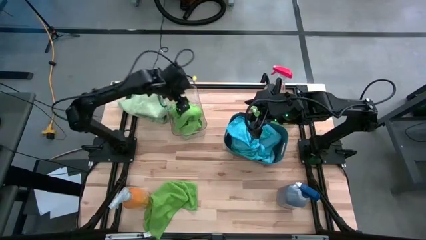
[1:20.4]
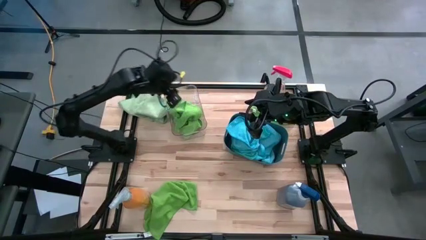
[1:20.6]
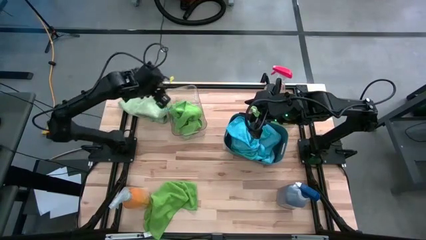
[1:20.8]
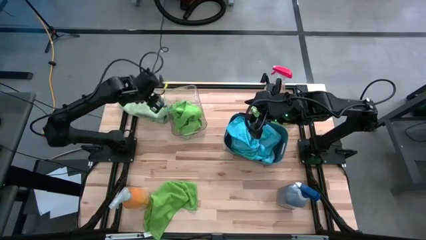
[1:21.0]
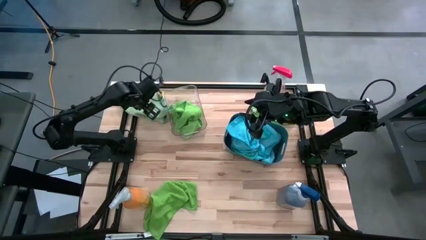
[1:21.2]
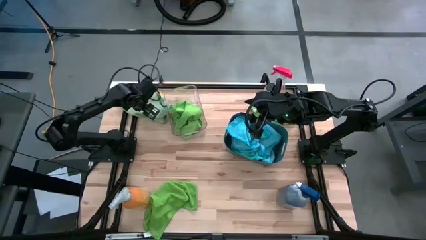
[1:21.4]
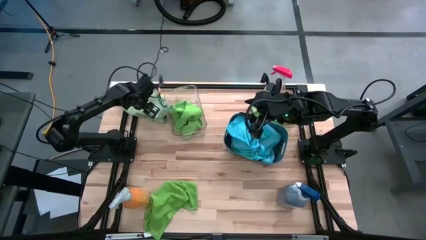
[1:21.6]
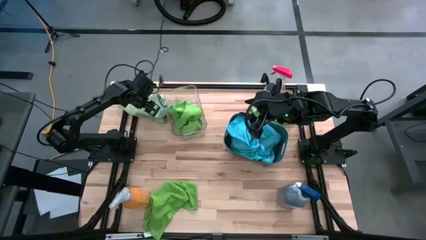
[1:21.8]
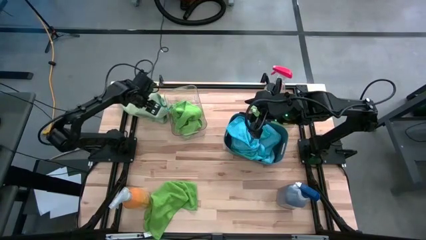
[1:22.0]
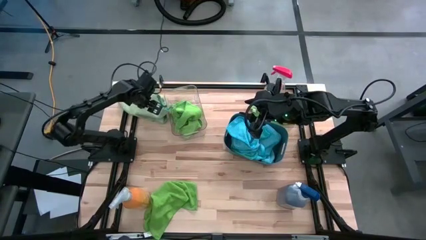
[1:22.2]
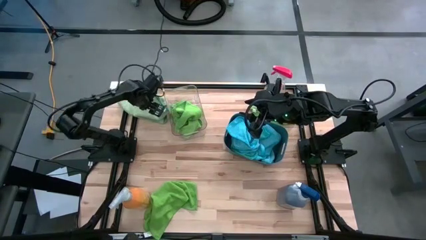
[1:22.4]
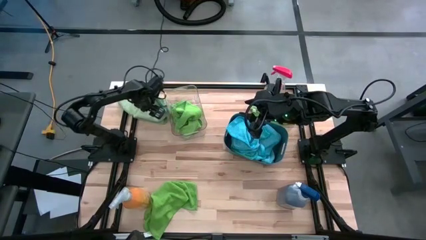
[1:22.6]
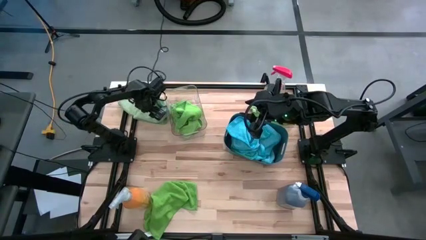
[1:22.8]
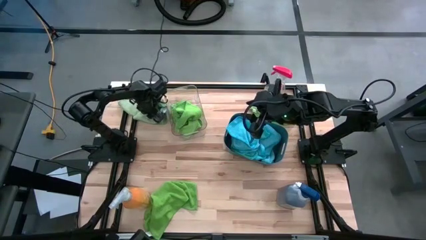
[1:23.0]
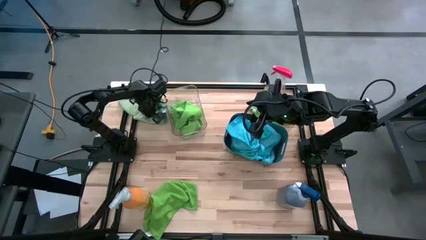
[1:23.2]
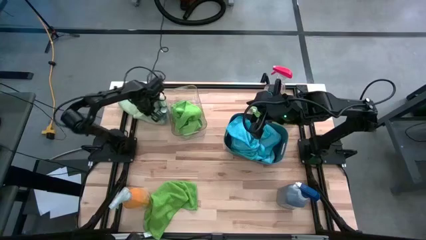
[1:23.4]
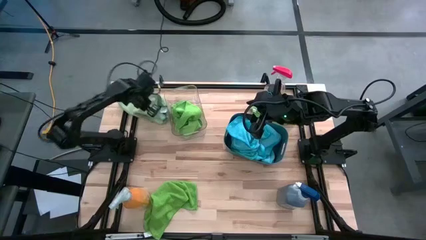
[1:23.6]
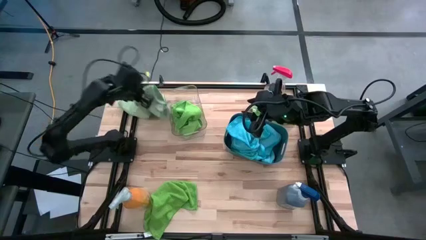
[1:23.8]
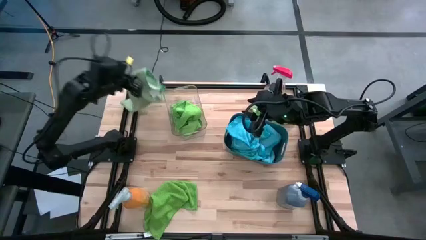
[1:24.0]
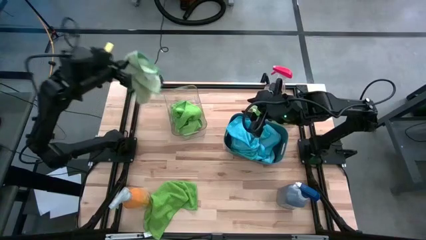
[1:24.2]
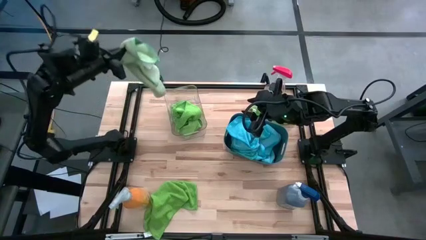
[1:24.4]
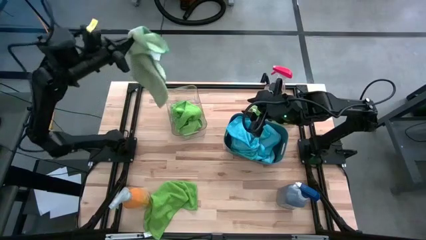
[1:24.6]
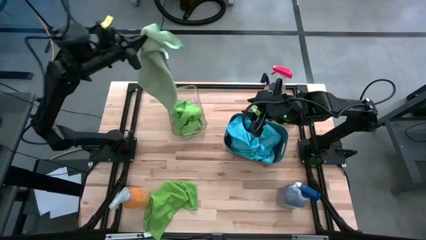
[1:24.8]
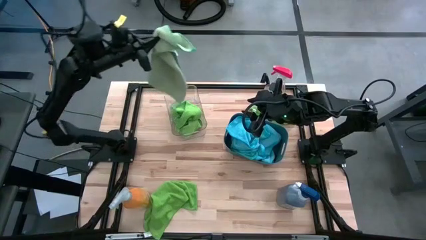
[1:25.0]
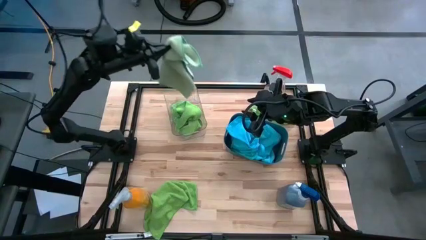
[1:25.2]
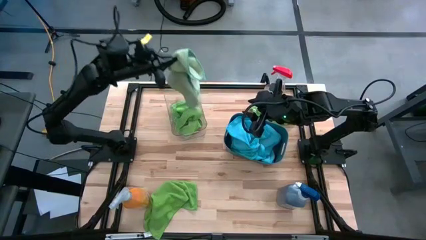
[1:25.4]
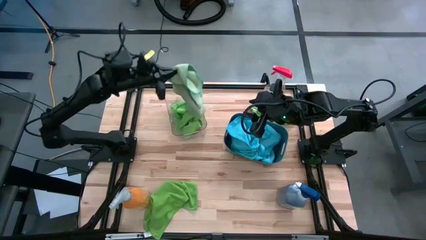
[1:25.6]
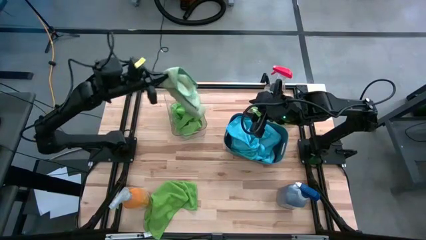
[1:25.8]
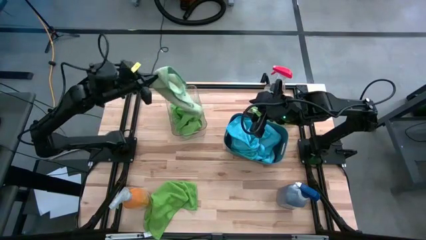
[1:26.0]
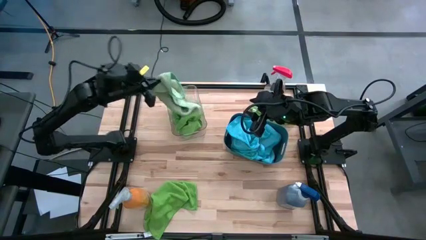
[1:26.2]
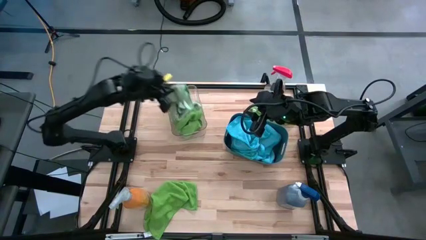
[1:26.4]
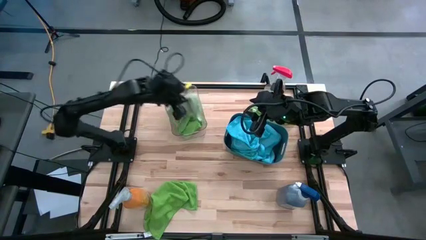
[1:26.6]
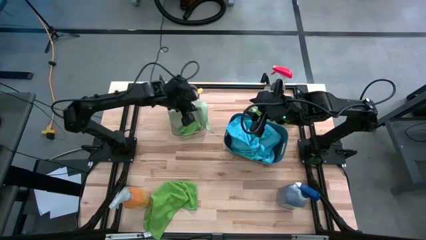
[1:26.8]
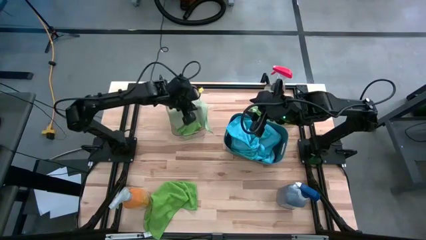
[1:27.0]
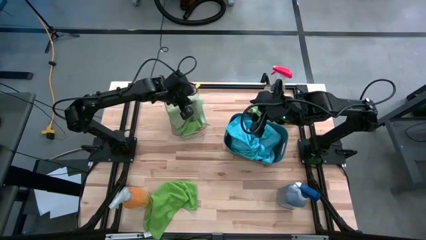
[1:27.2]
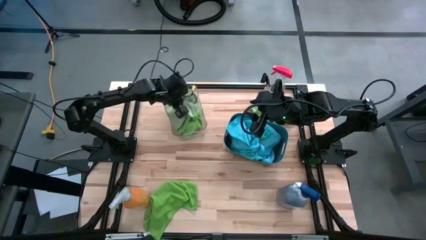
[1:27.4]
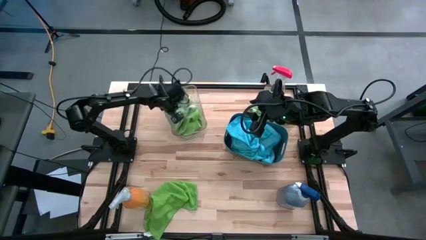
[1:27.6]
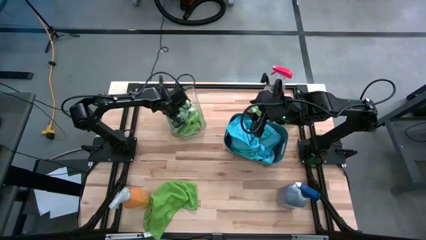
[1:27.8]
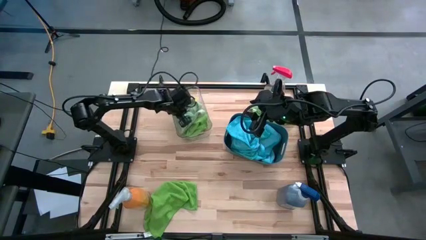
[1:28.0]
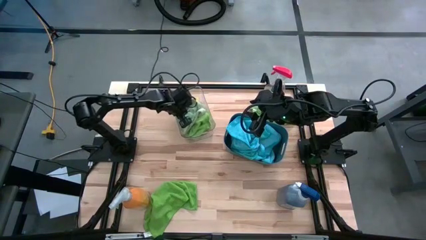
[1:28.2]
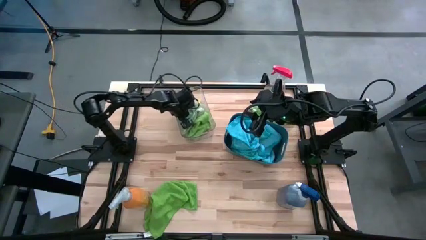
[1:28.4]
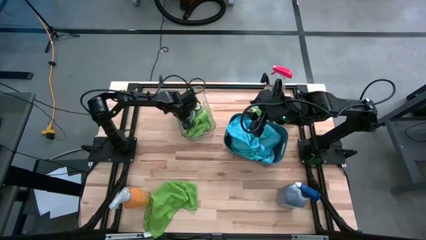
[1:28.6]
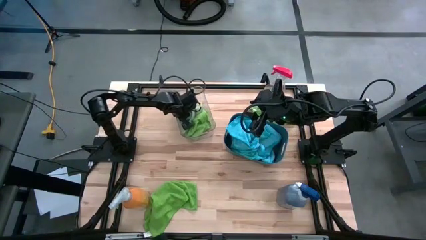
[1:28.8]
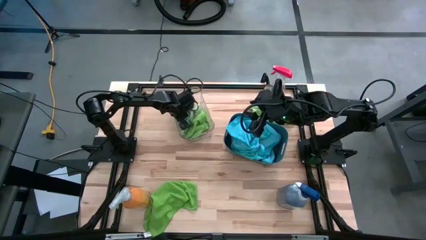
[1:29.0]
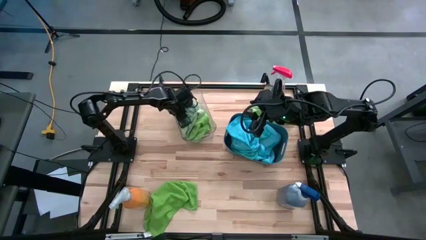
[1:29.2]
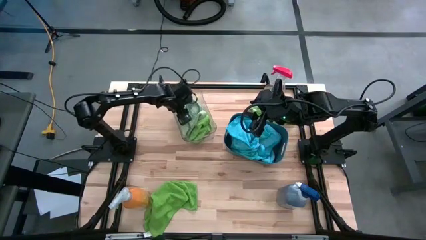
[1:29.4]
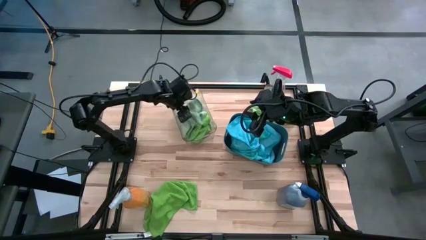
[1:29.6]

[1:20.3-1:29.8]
Task: Sort microfiber towel by color & place in baskets
Put the light green towel into the transparent bin

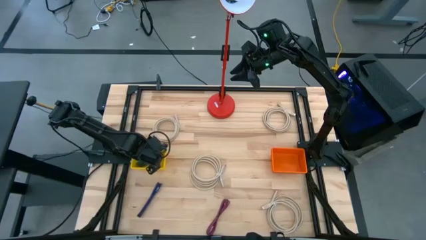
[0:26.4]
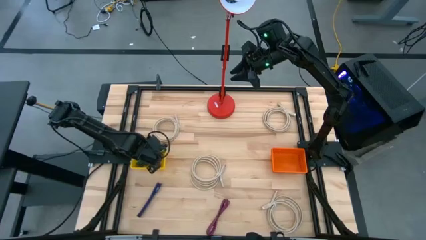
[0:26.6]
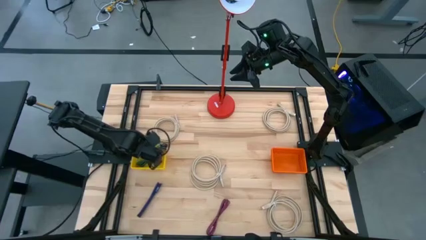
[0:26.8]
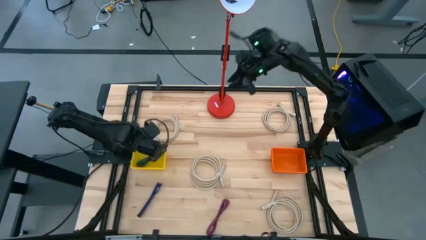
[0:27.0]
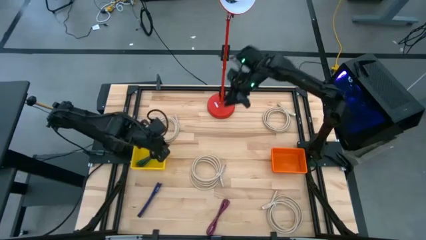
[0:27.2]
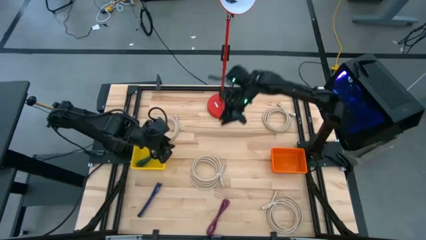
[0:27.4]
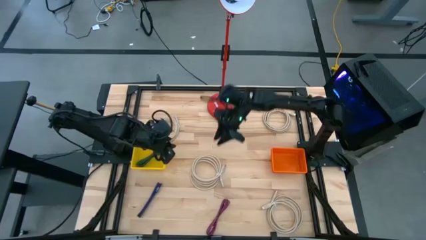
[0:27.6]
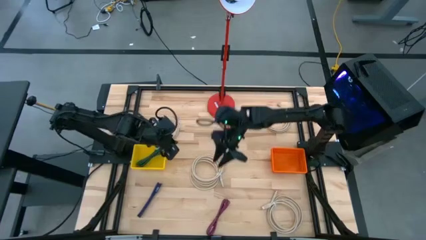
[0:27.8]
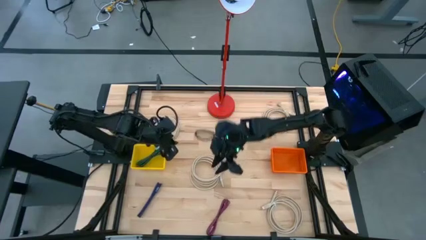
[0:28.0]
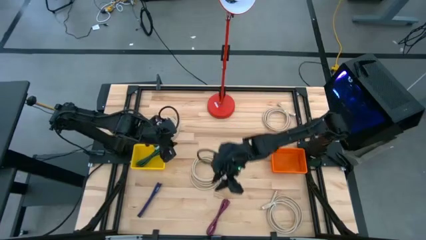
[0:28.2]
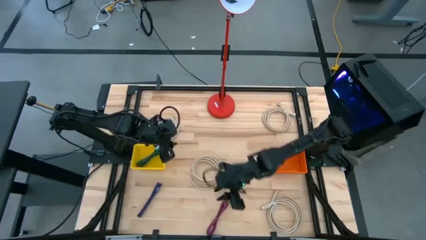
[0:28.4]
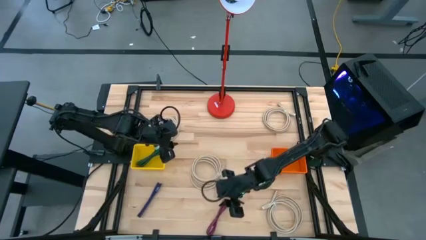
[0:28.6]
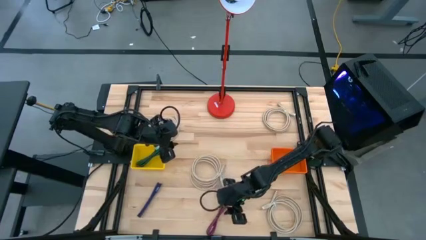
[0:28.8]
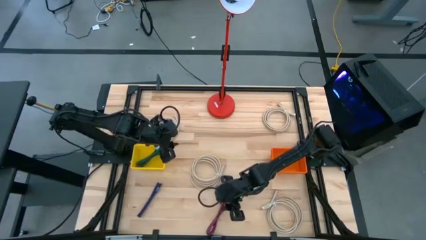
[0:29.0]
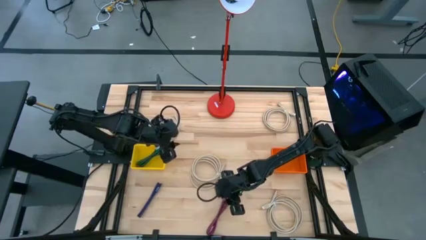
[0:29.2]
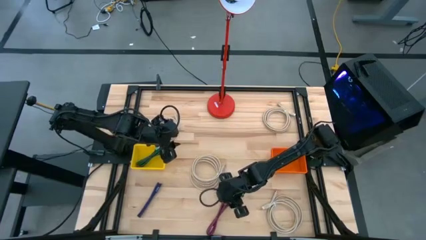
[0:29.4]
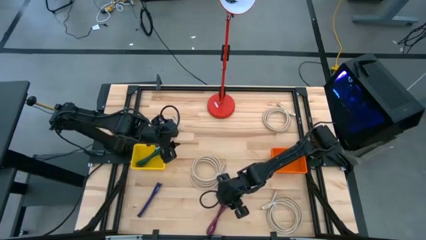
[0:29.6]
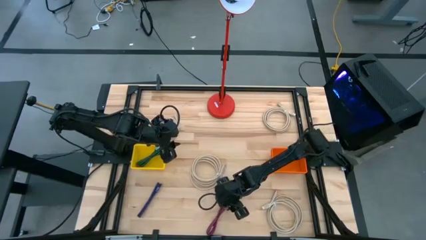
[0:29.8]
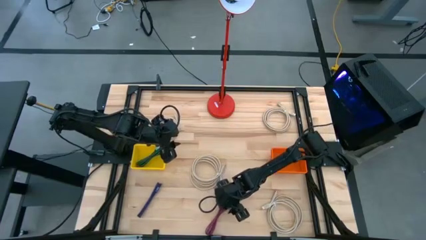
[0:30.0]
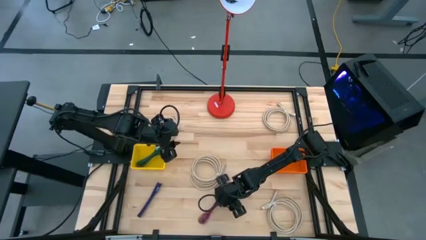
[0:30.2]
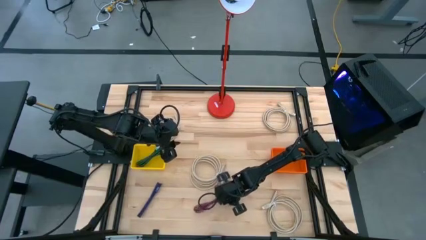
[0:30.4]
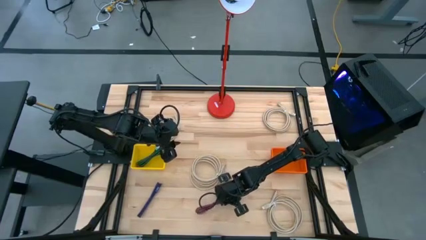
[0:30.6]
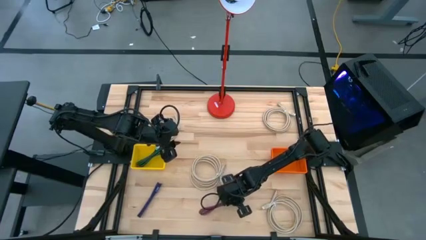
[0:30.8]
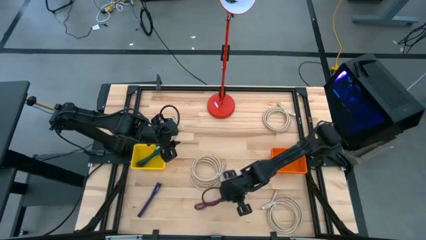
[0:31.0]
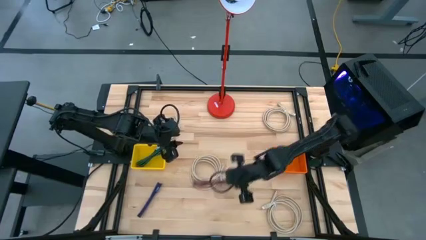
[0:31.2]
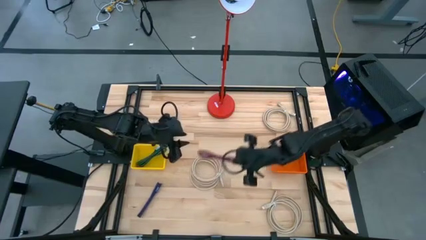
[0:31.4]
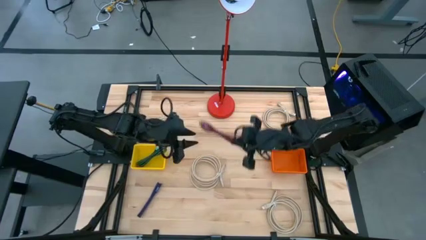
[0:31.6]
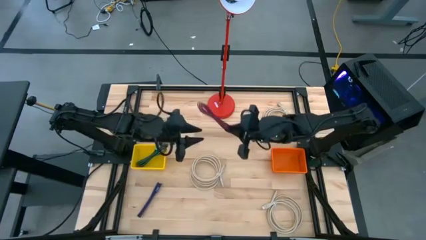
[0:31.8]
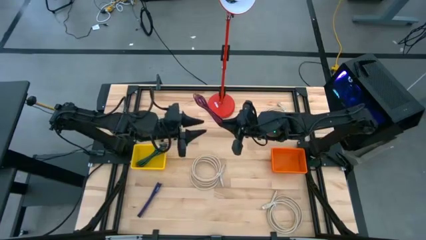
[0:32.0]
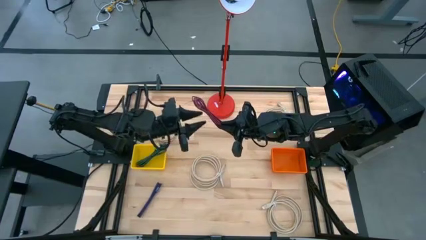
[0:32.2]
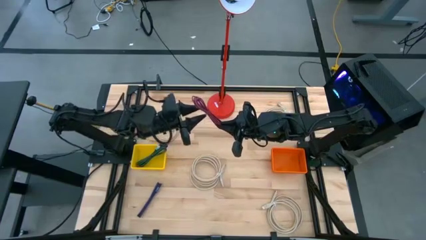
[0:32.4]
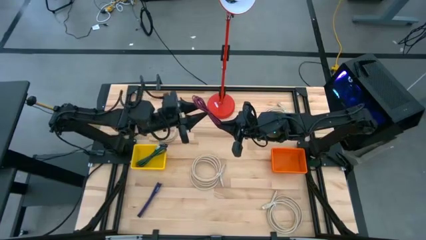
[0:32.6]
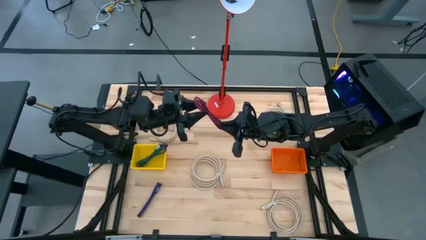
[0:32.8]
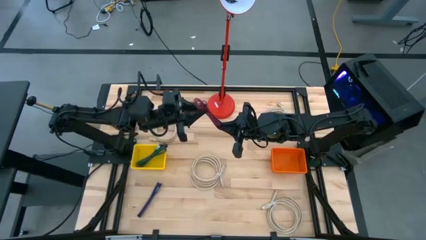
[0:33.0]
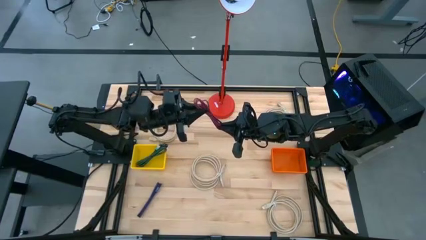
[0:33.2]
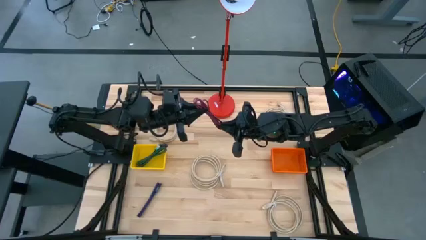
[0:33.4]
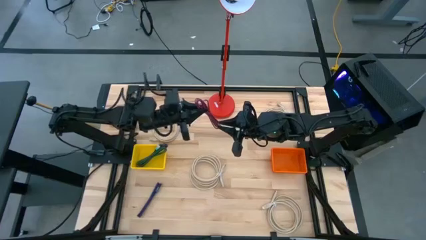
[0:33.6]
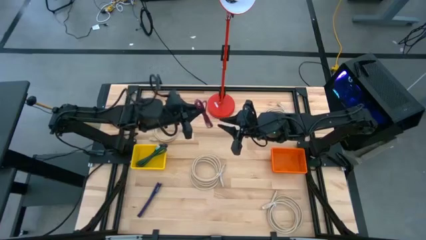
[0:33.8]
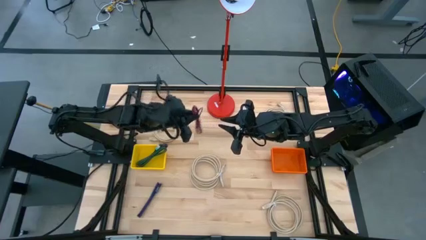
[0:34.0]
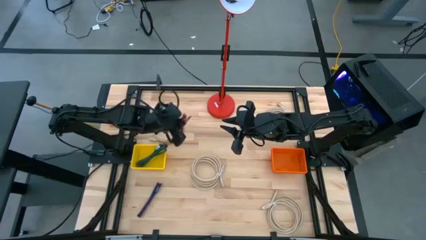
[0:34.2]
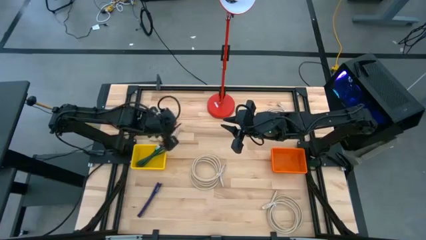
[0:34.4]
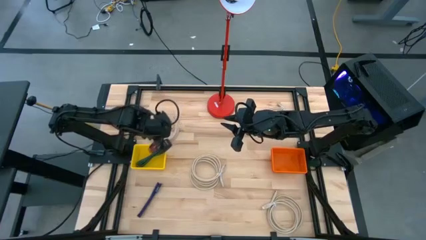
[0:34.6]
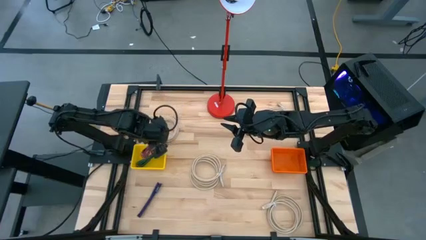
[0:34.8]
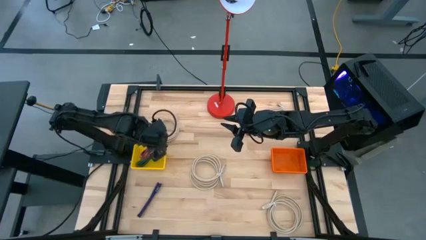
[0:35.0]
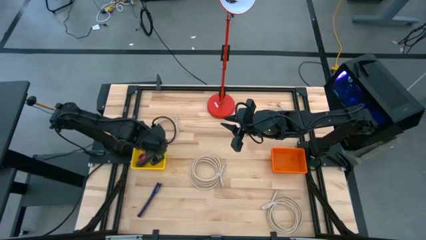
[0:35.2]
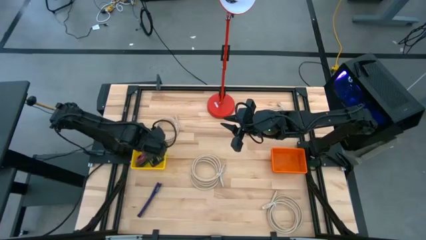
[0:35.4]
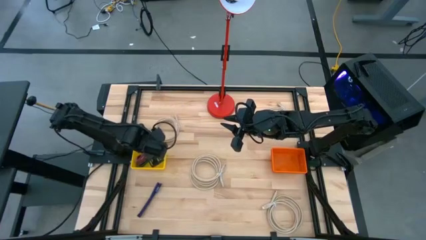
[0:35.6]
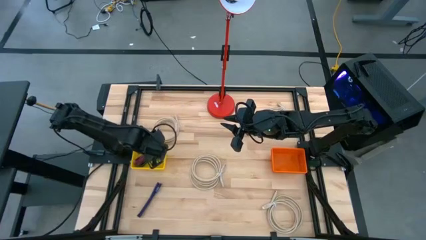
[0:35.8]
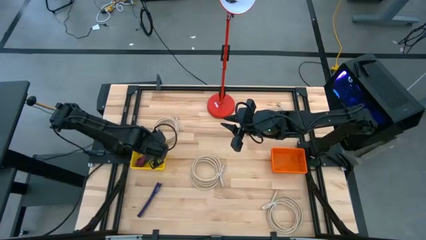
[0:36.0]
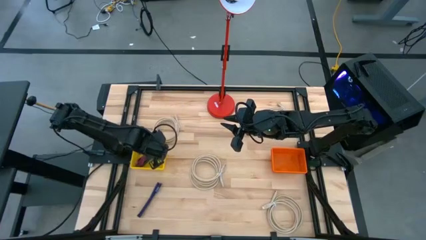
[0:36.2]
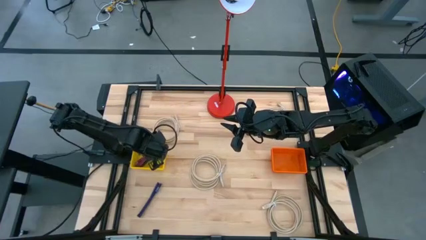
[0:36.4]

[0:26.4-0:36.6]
Task: Pick & Place USB Port
Put the black and pink charger cable into the yellow bin
